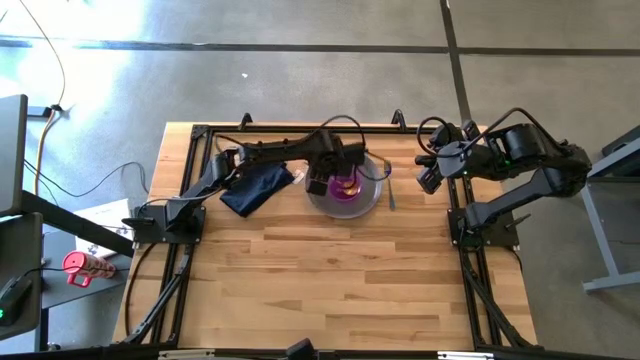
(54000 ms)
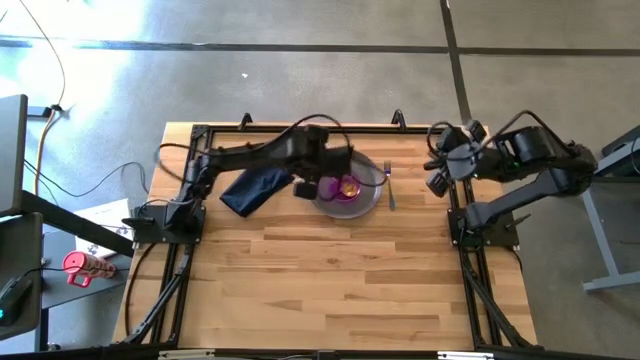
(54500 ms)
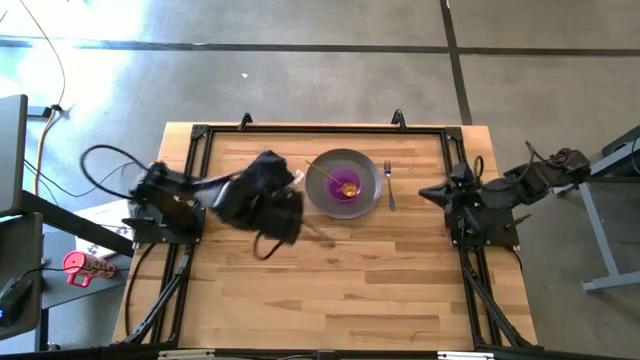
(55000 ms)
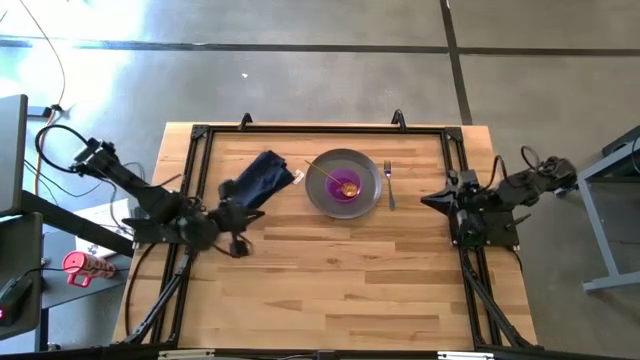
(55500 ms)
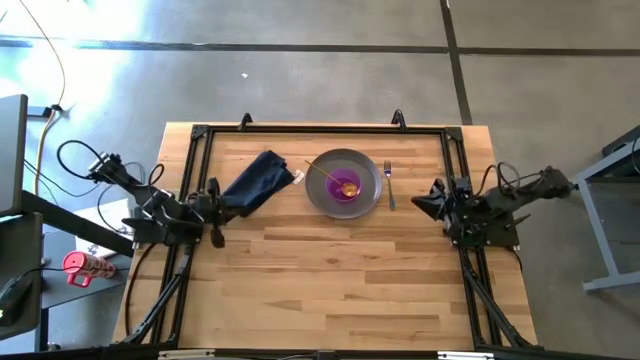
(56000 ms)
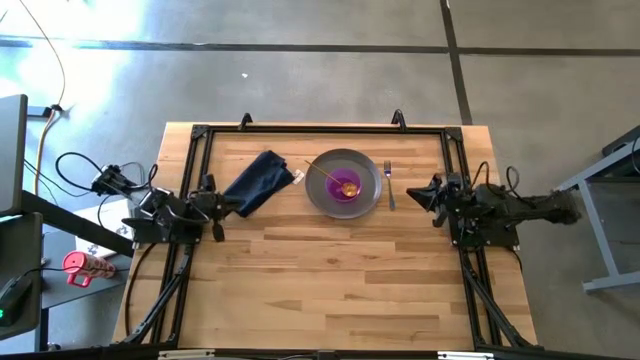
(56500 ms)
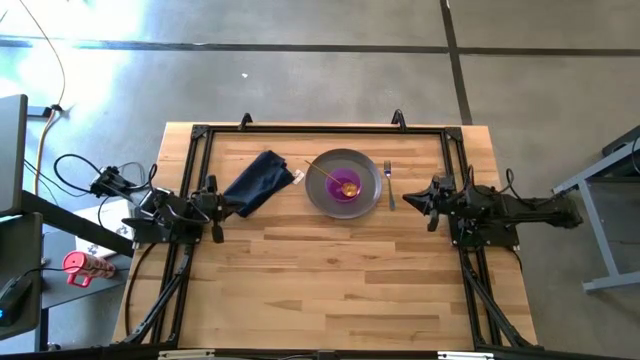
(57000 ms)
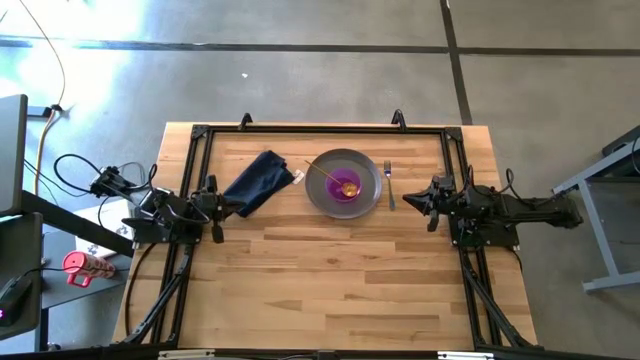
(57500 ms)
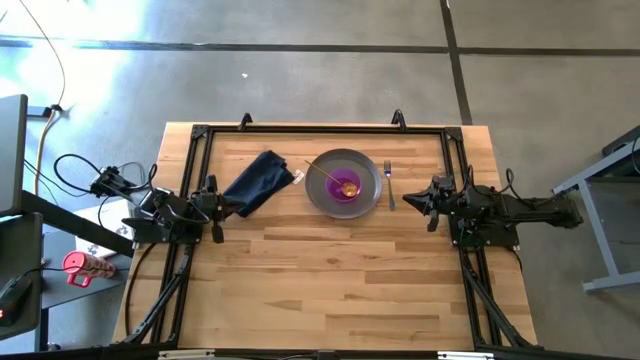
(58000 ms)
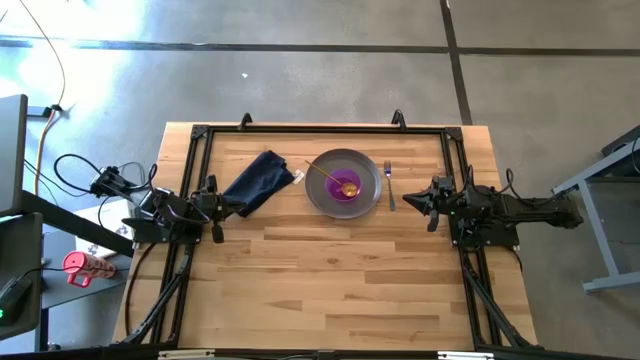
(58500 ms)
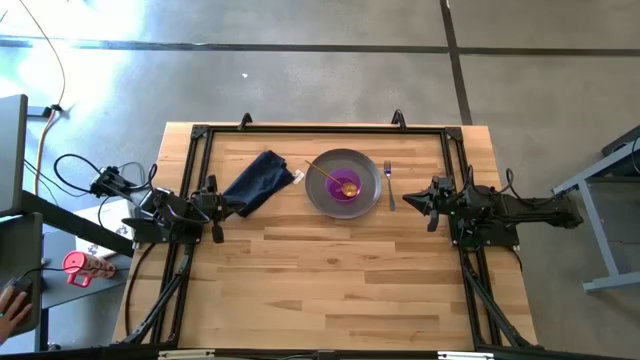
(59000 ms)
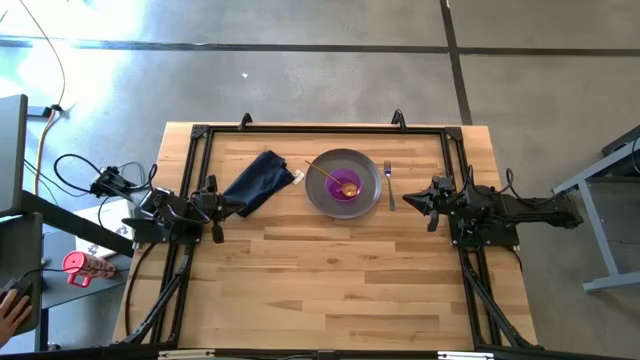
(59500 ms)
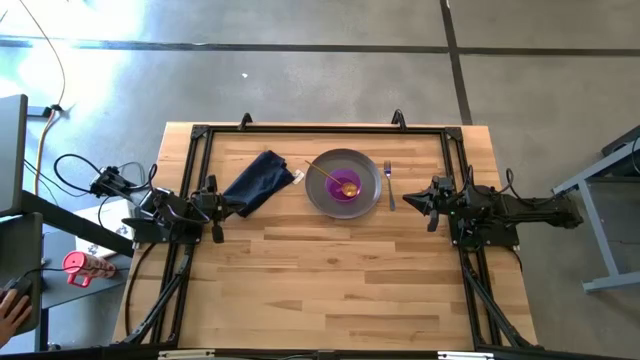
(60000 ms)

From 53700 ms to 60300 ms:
Task: Set table place
Return to Home Position

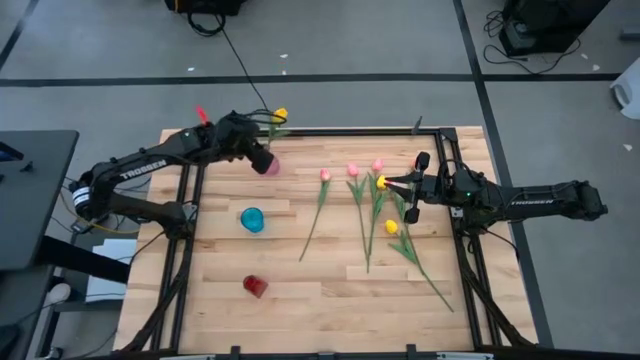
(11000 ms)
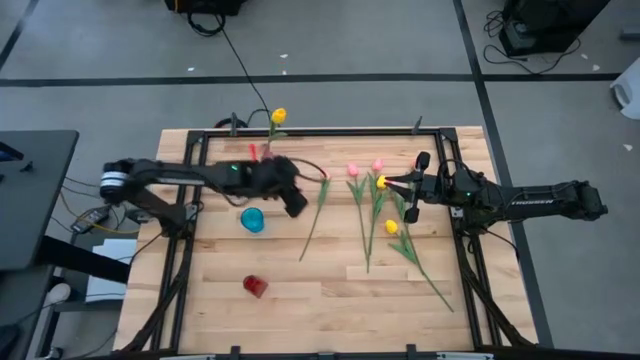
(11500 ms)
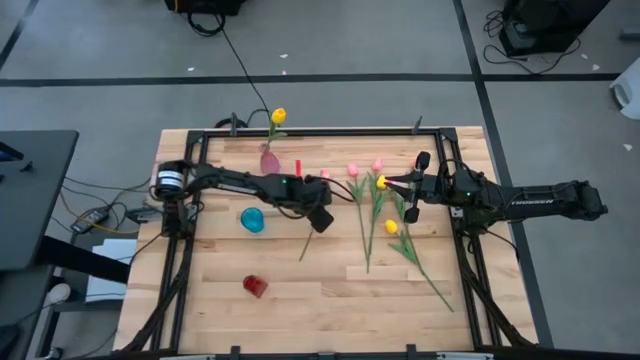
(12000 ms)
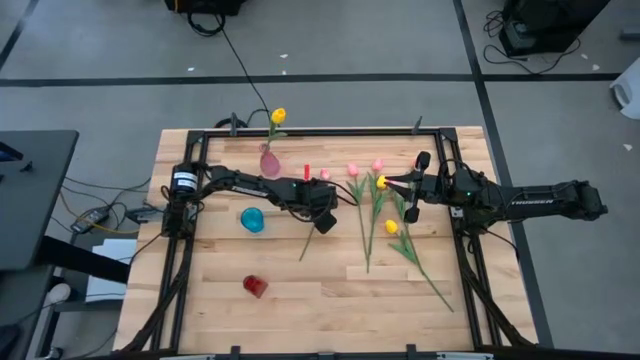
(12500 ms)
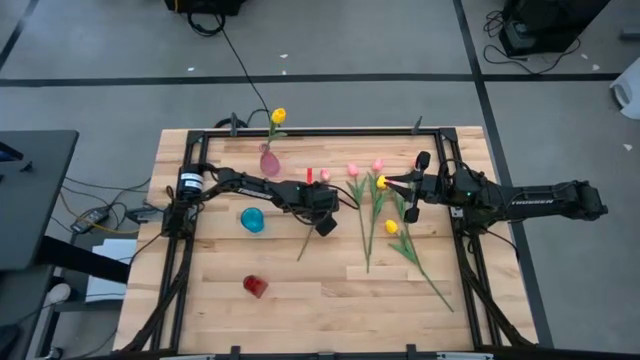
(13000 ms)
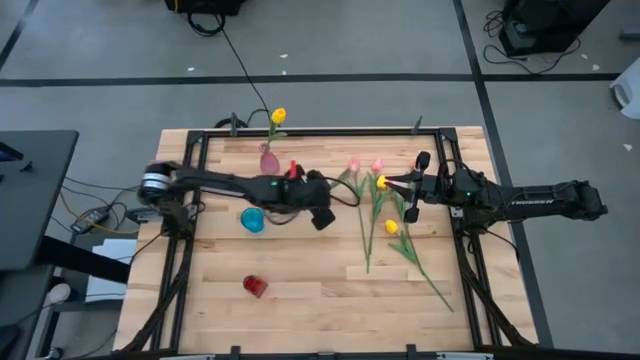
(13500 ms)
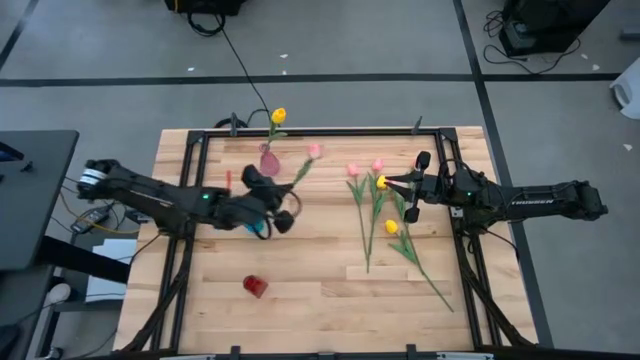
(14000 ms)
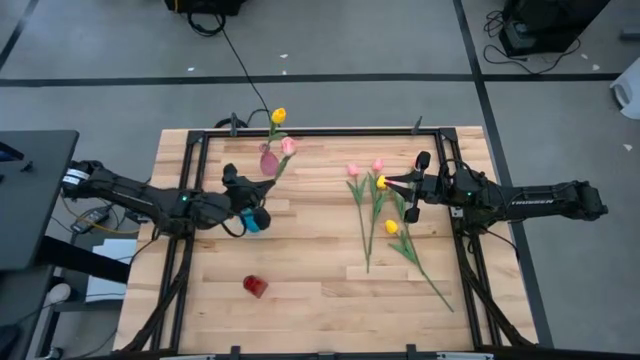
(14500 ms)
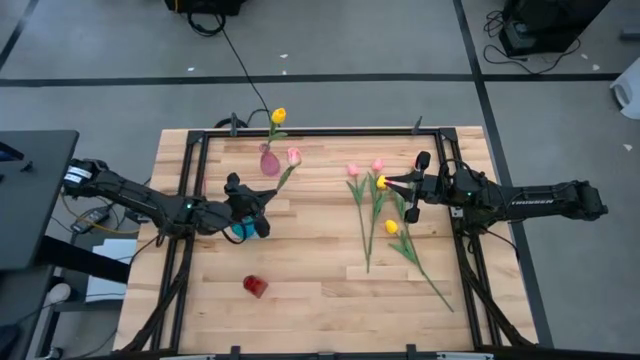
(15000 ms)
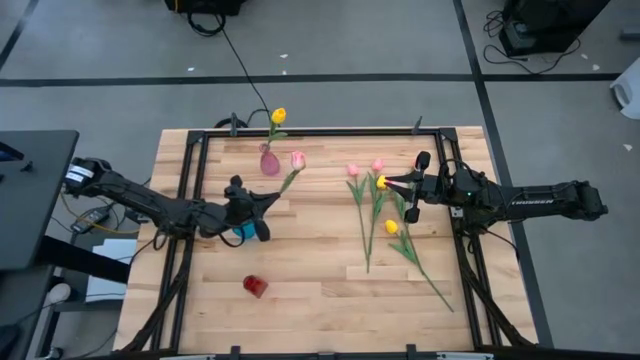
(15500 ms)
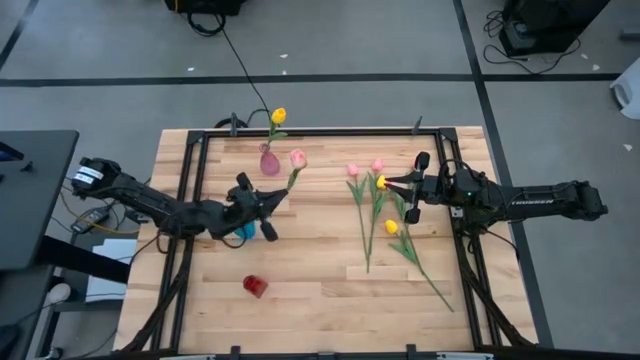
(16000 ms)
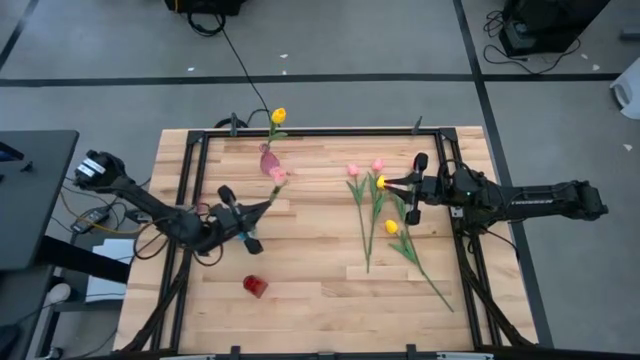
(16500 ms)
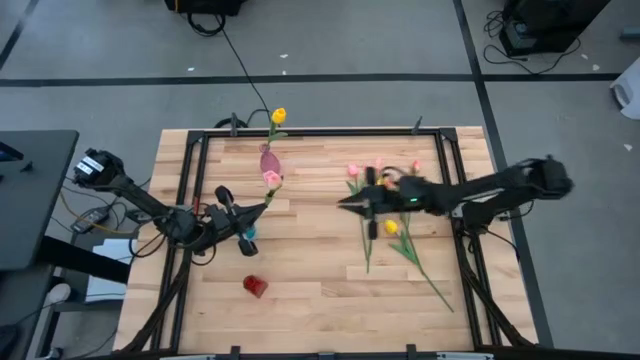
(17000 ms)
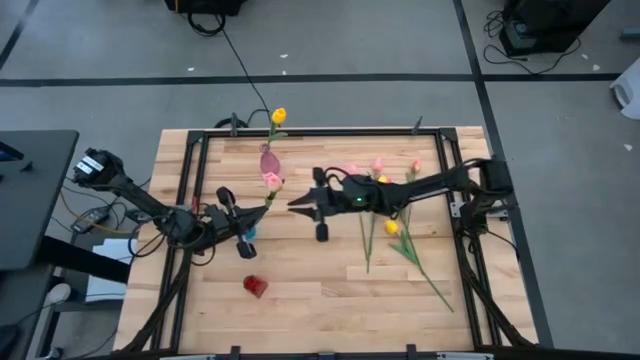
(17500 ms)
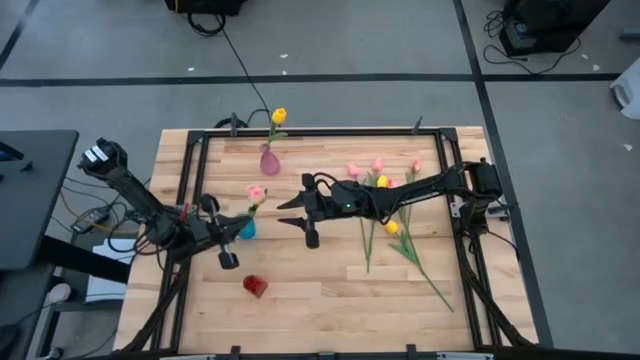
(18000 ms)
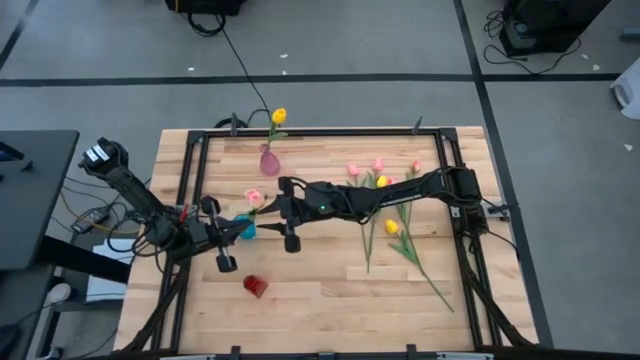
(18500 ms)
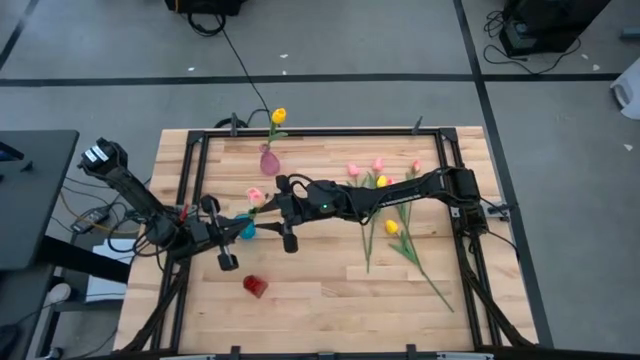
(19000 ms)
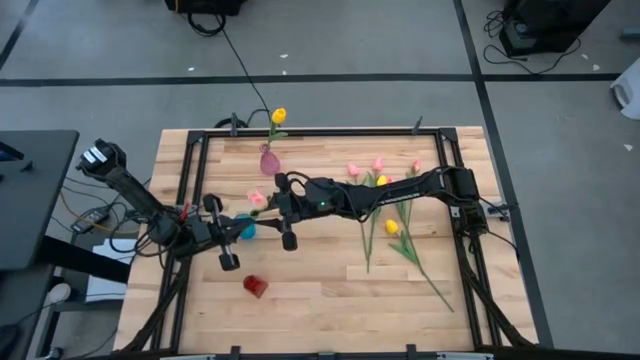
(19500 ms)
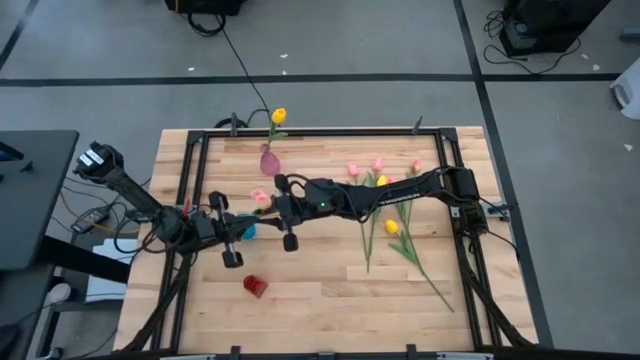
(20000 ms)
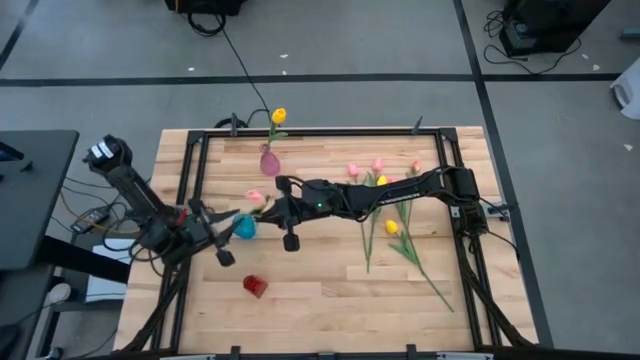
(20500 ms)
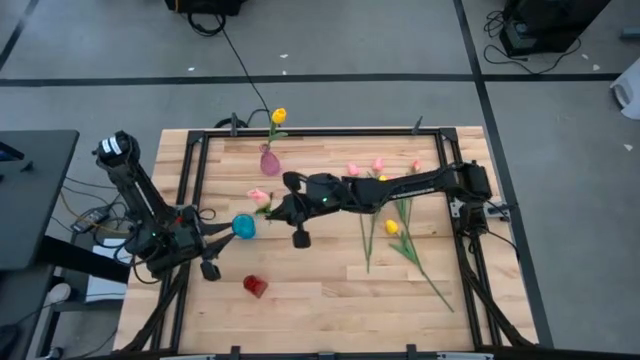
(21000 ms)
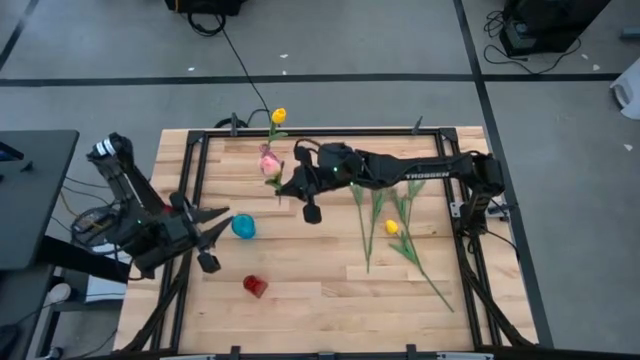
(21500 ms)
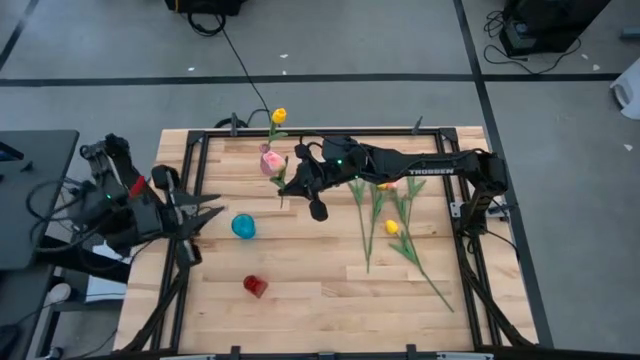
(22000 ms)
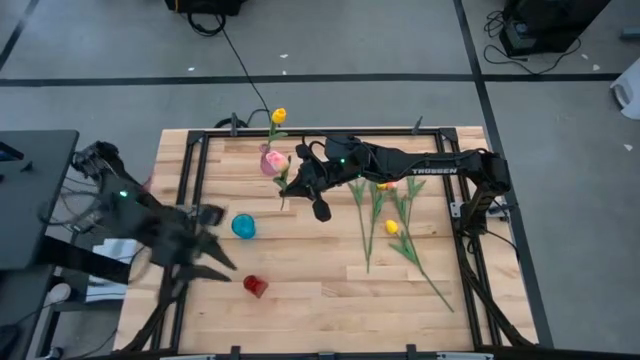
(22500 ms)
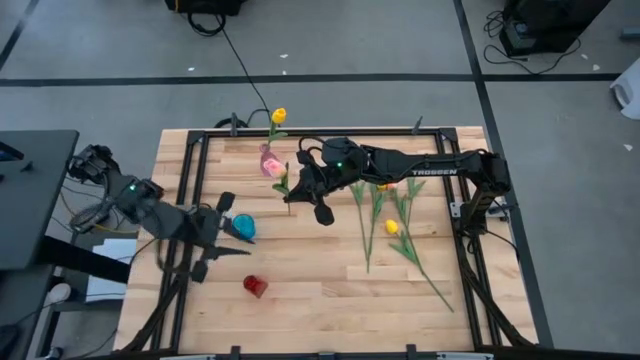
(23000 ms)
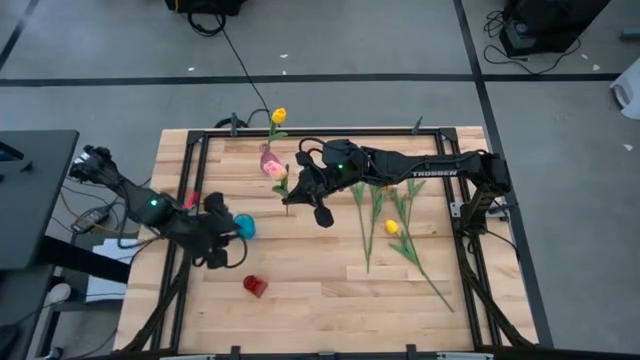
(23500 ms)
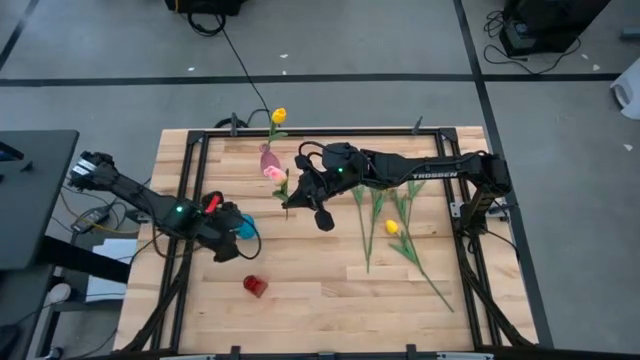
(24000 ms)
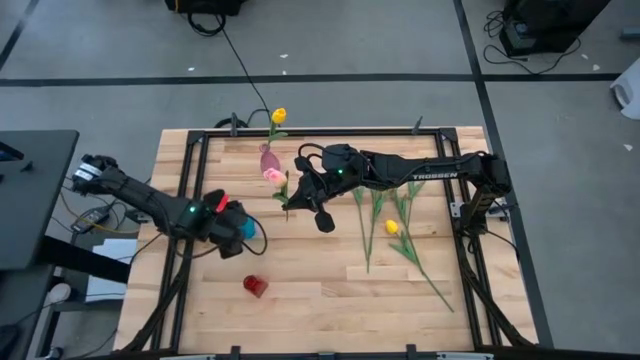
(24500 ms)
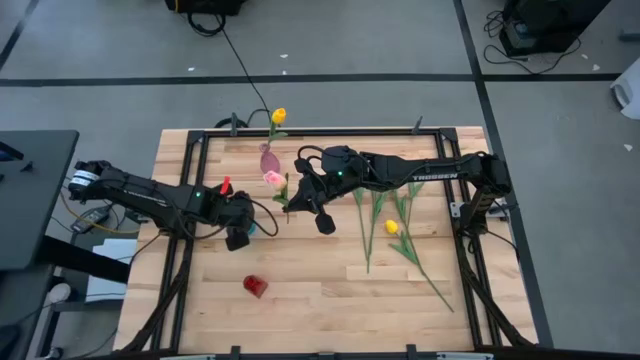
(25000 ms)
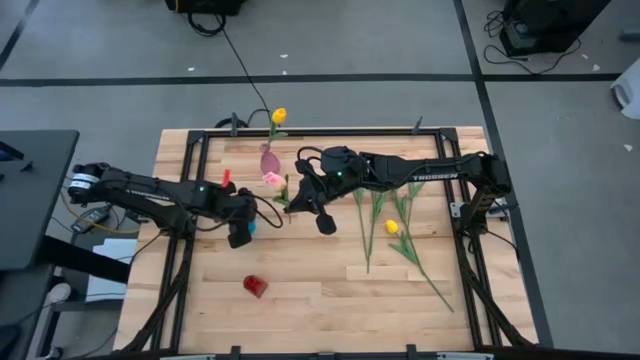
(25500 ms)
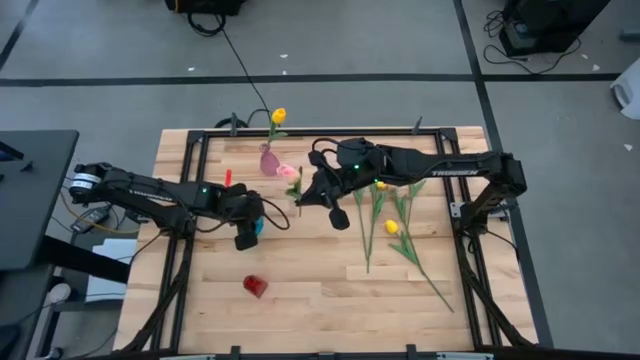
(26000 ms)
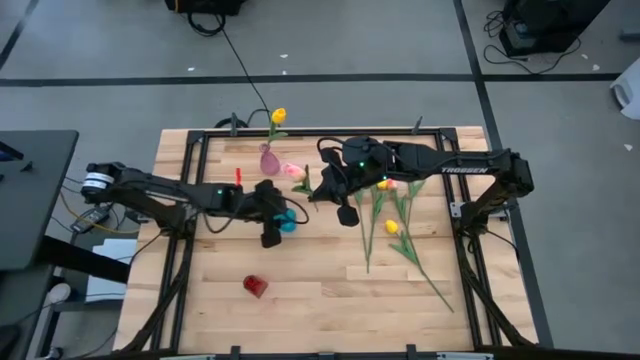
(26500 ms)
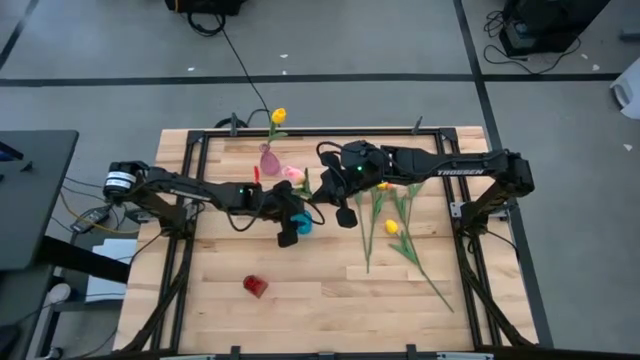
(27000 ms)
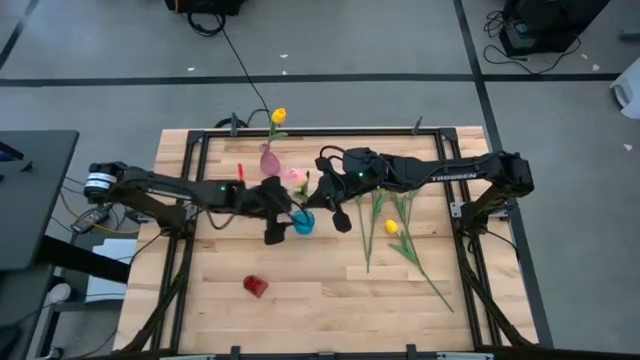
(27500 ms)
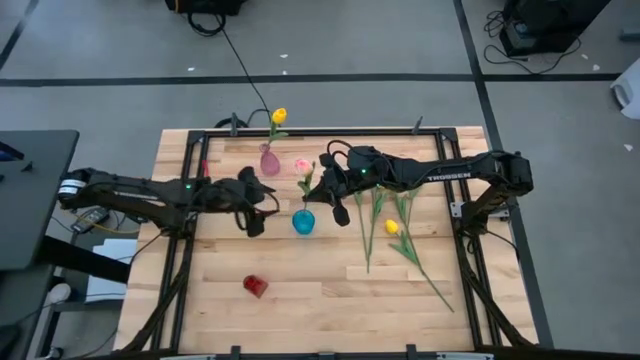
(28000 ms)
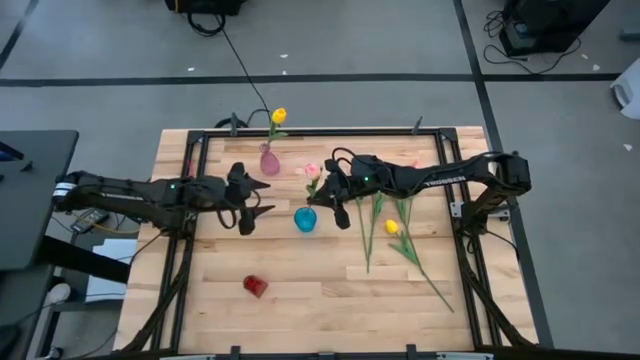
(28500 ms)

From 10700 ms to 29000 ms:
Task: Sort flowers into vase by color
Put the pink flower into the blue flower vase
